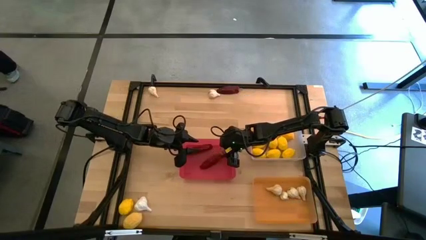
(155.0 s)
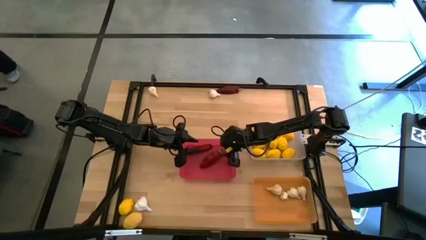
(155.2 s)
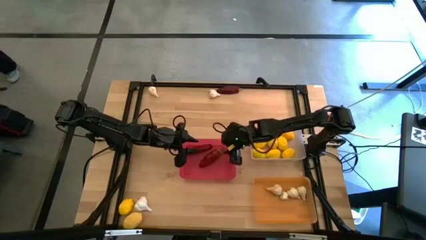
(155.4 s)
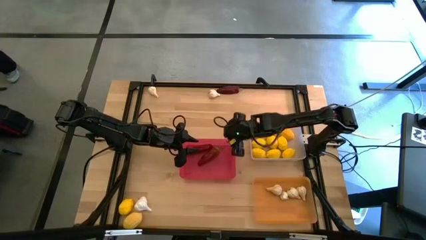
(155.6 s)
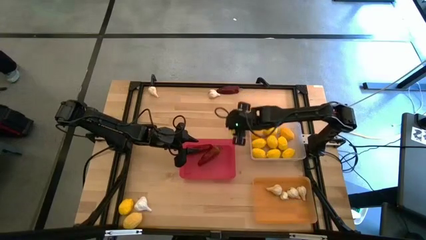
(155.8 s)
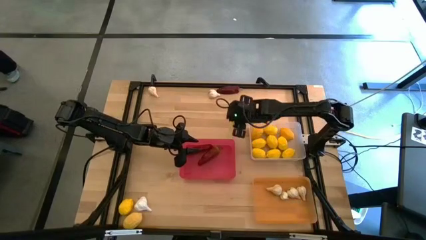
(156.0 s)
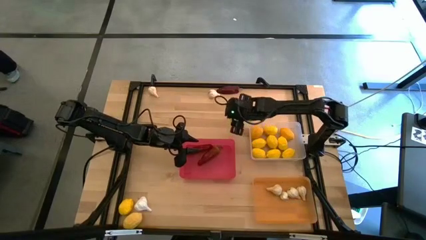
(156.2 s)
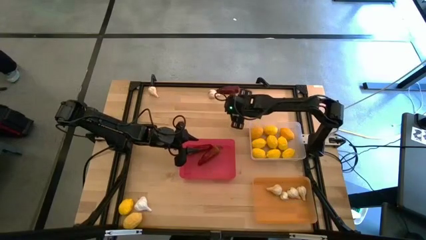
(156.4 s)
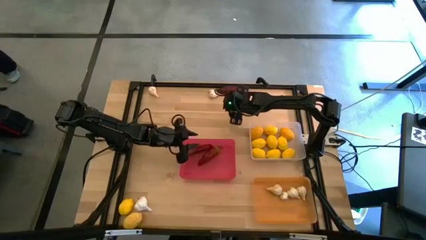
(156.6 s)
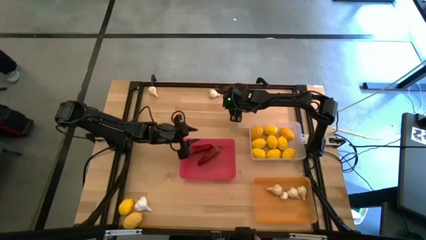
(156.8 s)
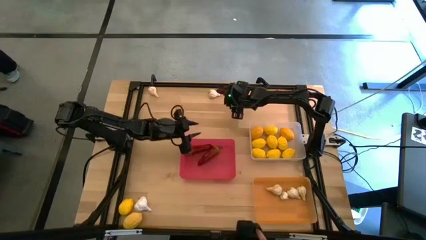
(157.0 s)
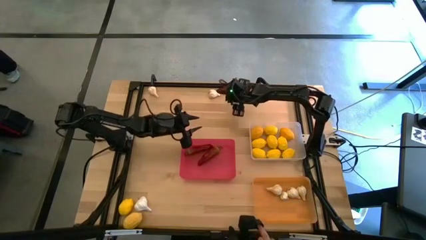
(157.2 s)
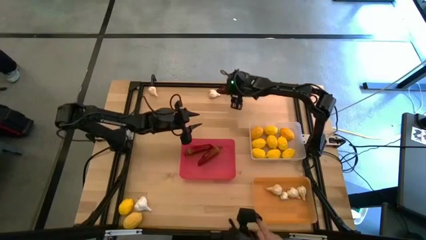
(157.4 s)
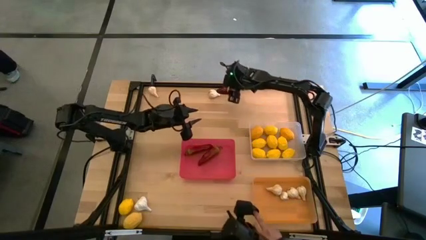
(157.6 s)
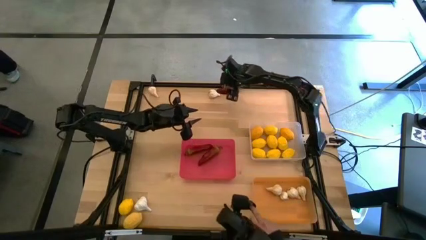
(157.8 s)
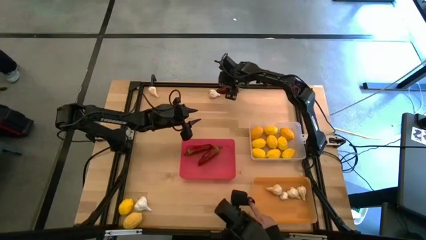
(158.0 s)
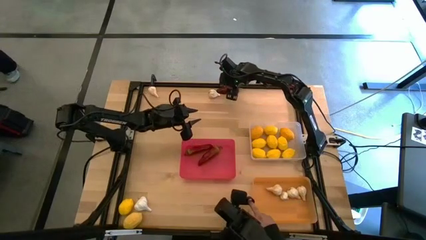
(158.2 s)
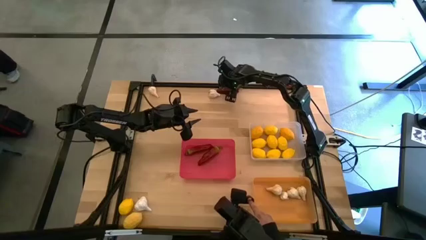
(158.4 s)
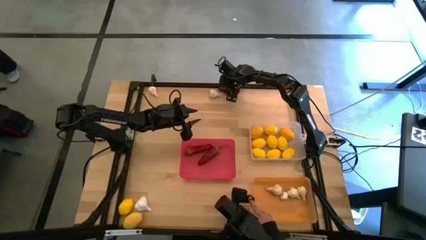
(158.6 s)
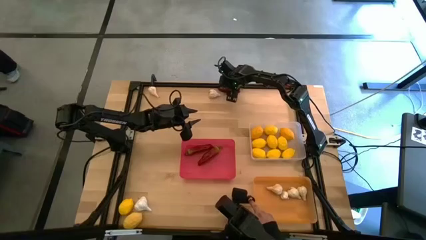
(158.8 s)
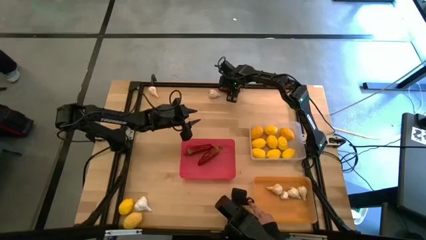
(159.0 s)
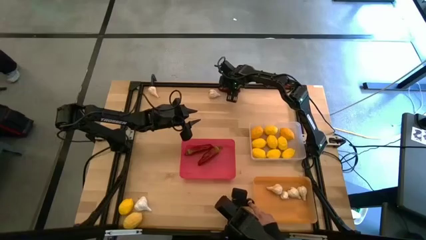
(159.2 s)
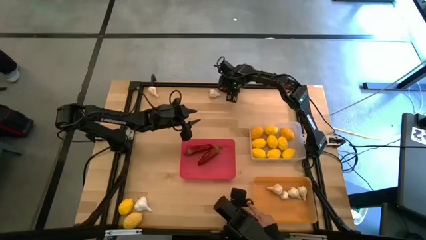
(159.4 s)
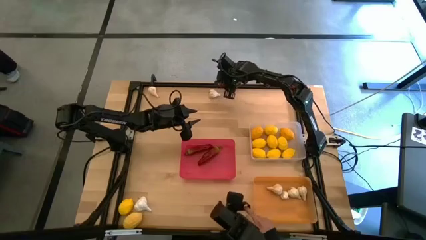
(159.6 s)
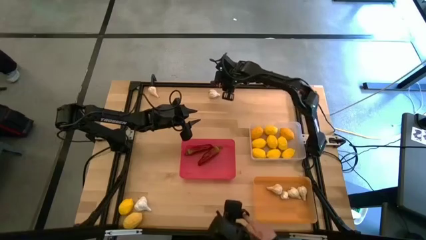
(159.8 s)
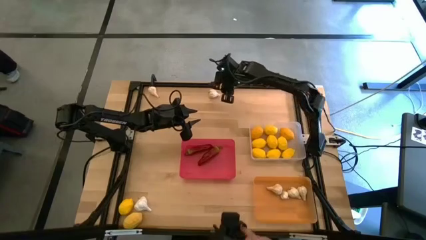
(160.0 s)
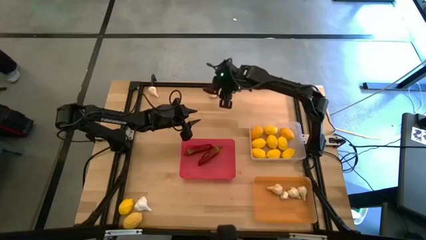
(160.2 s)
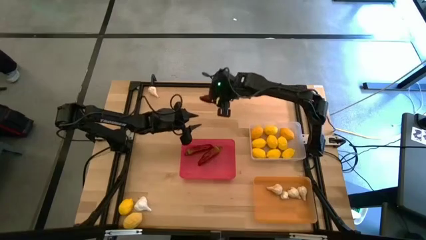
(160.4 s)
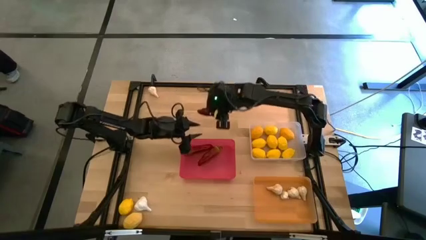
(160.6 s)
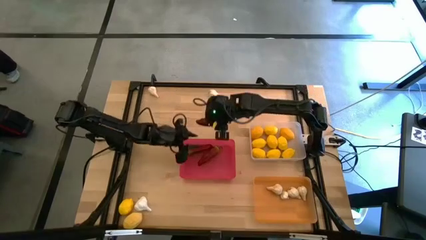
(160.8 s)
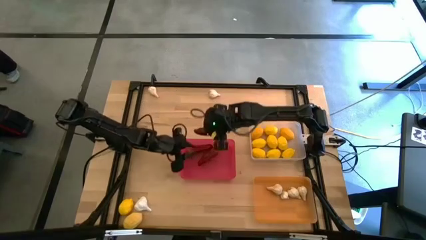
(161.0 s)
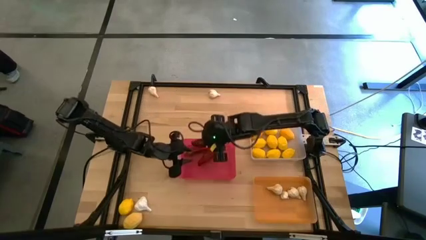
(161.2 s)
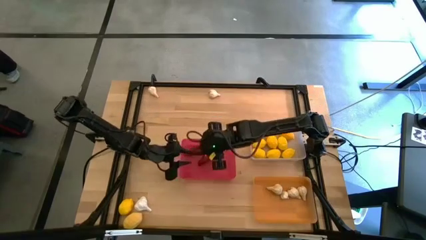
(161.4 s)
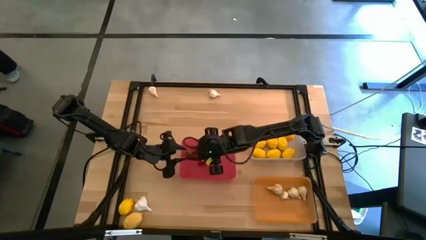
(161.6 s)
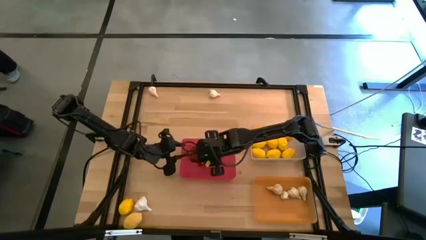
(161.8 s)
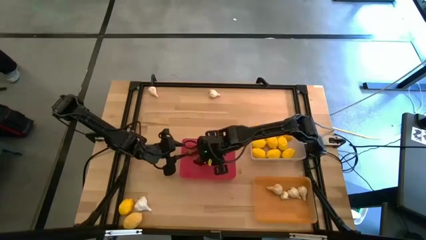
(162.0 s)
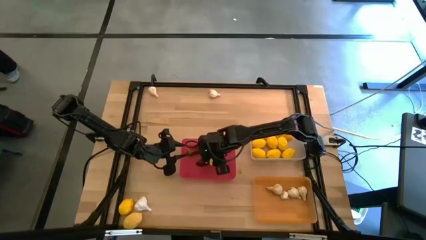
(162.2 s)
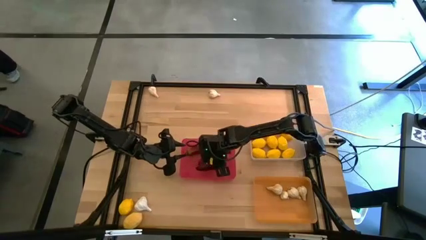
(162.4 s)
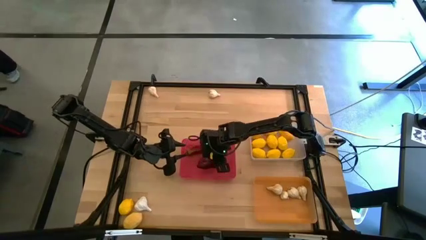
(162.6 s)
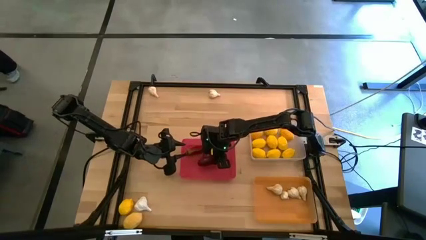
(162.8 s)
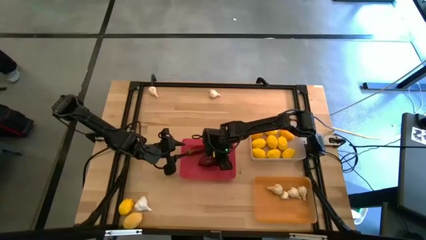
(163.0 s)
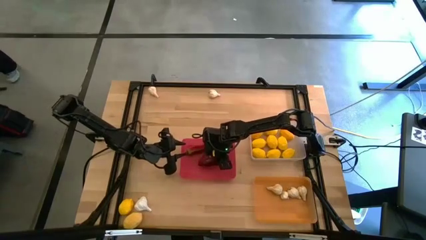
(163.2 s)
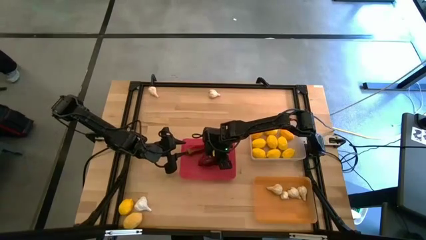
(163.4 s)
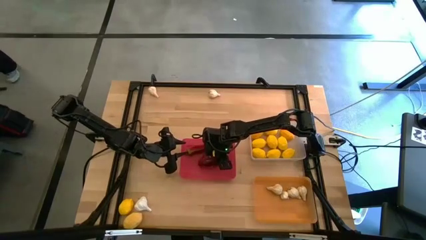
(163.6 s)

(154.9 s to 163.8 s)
Task: Sort produce into baskets
Put the red chili pepper into the red bin

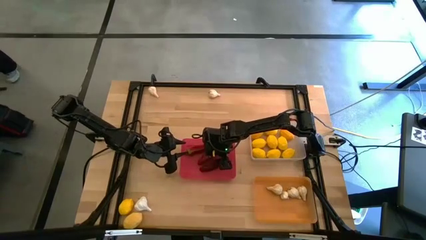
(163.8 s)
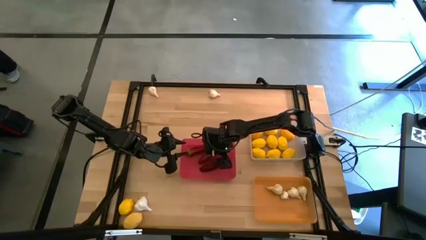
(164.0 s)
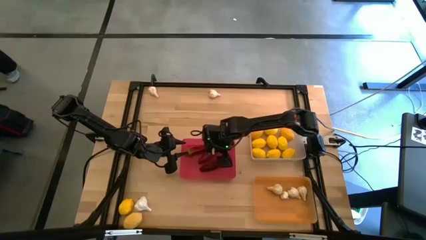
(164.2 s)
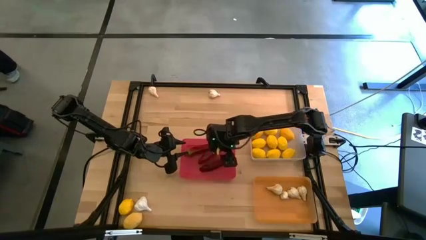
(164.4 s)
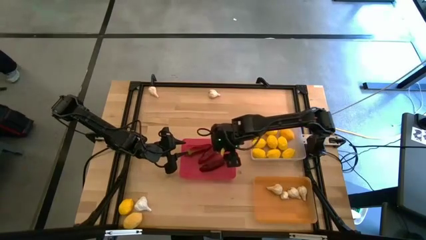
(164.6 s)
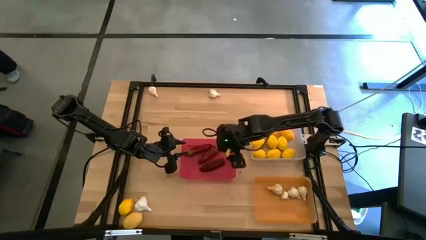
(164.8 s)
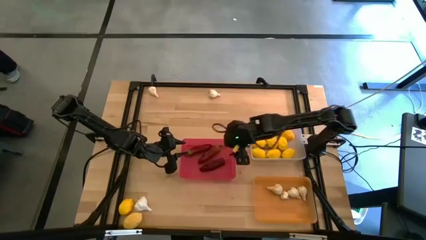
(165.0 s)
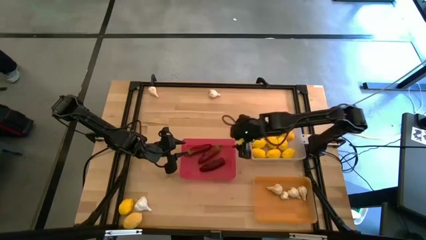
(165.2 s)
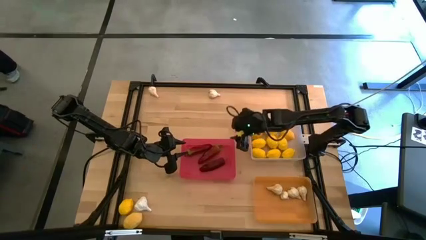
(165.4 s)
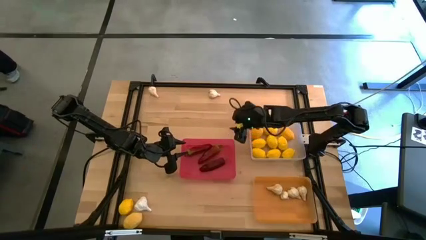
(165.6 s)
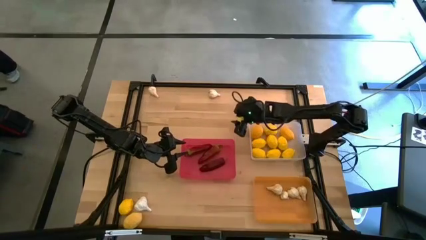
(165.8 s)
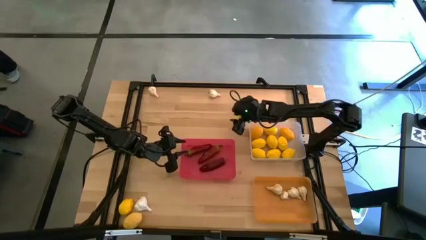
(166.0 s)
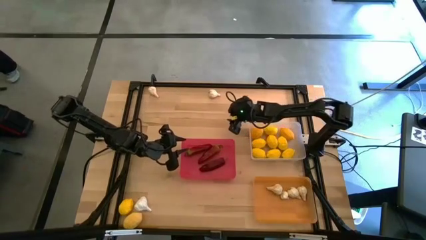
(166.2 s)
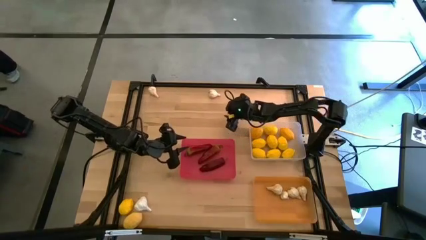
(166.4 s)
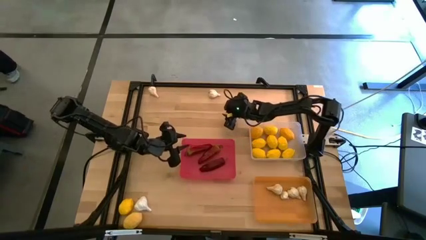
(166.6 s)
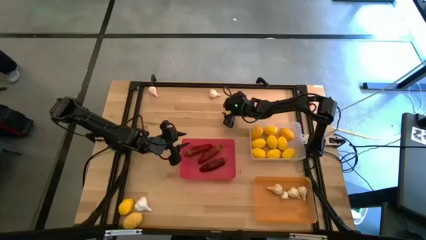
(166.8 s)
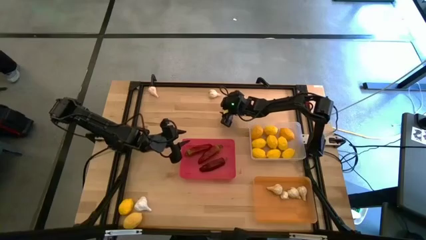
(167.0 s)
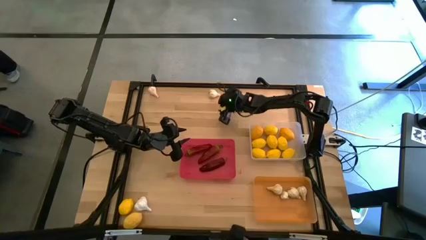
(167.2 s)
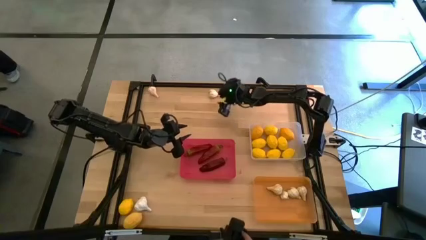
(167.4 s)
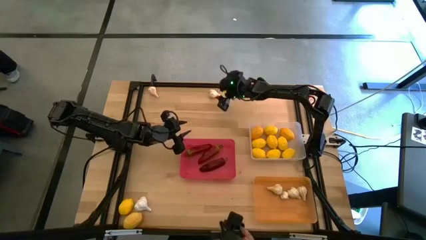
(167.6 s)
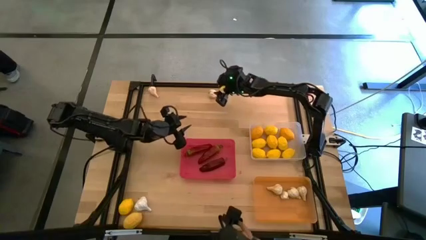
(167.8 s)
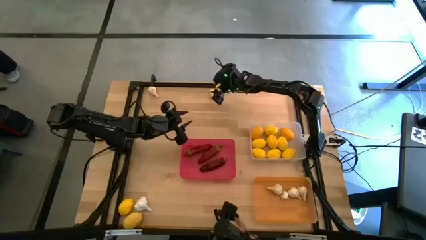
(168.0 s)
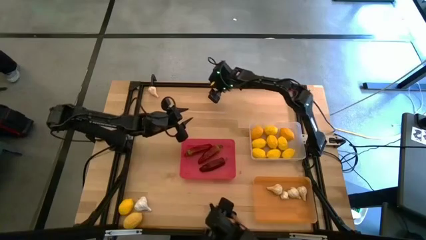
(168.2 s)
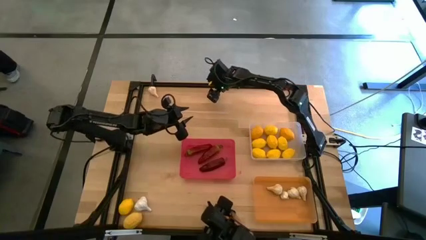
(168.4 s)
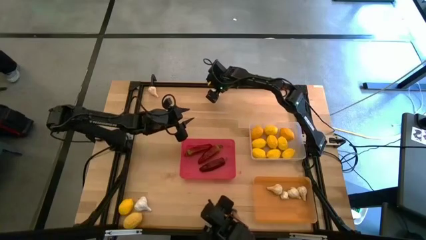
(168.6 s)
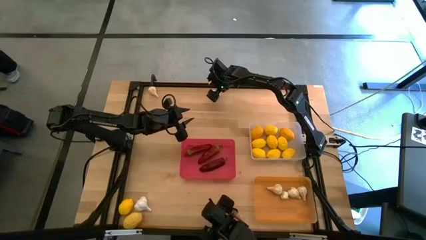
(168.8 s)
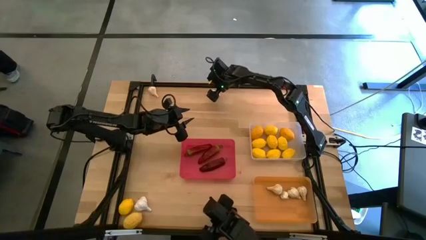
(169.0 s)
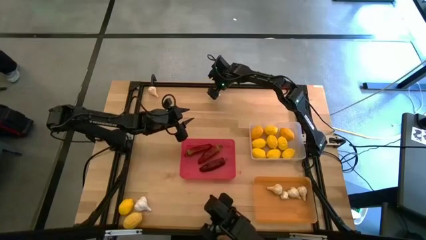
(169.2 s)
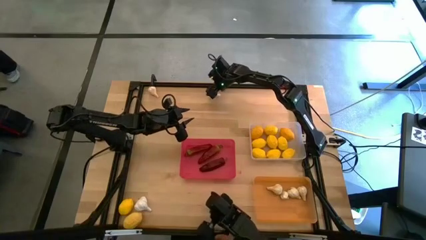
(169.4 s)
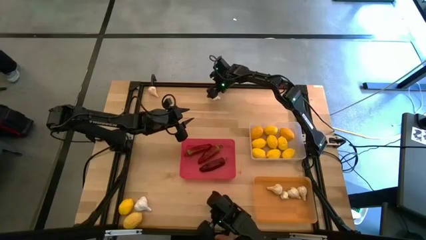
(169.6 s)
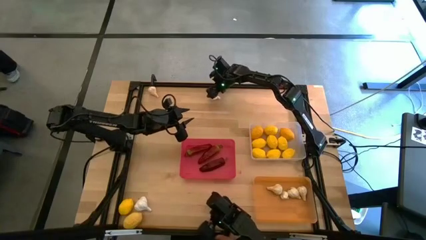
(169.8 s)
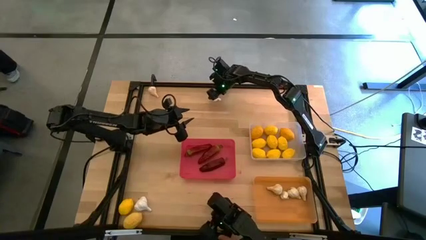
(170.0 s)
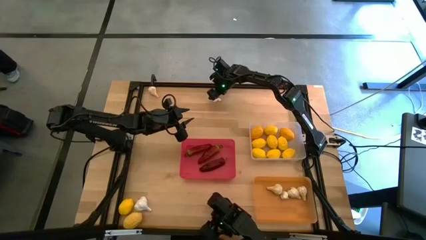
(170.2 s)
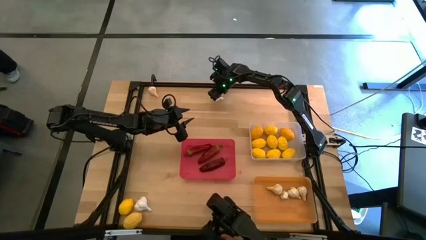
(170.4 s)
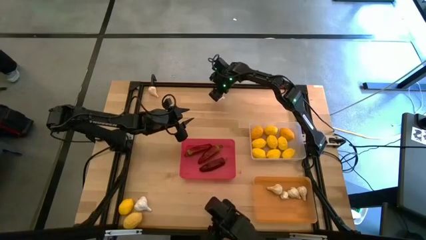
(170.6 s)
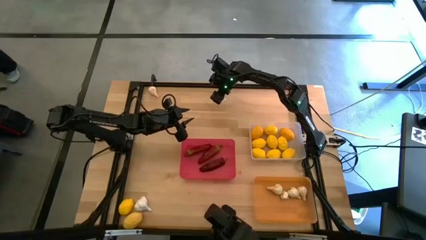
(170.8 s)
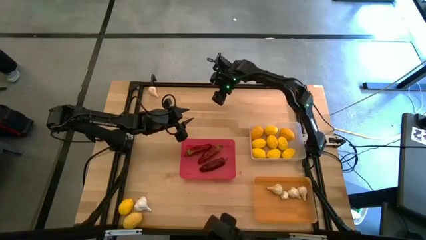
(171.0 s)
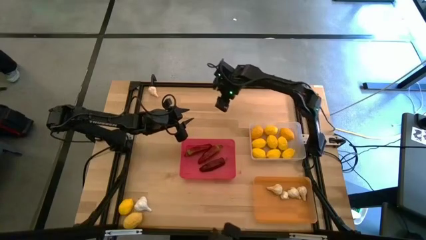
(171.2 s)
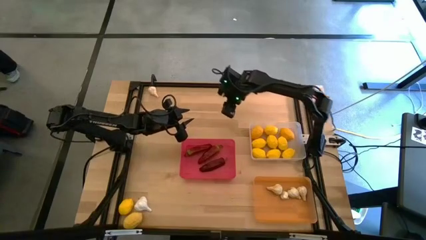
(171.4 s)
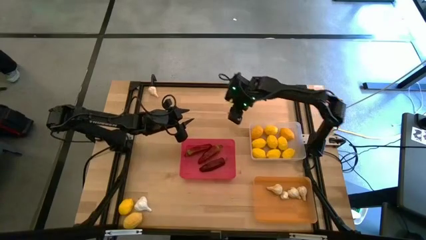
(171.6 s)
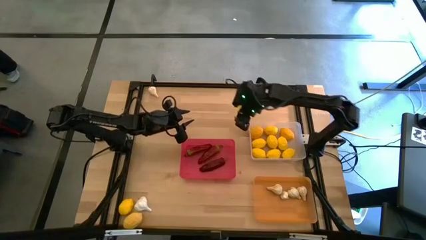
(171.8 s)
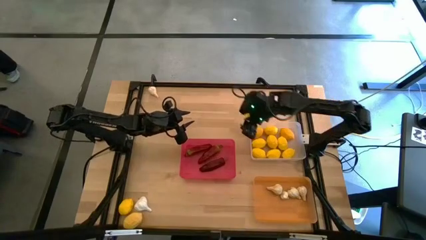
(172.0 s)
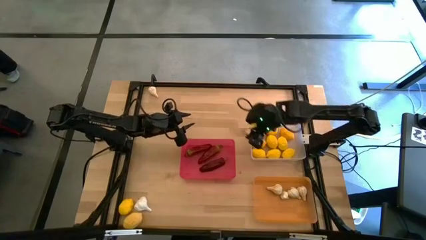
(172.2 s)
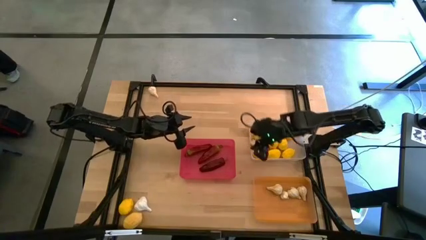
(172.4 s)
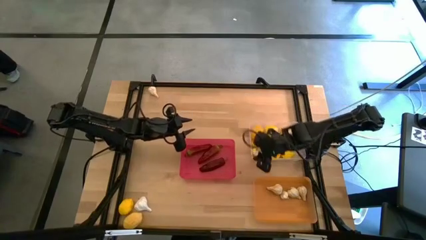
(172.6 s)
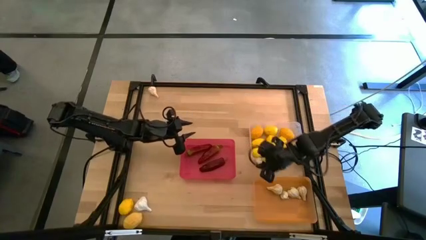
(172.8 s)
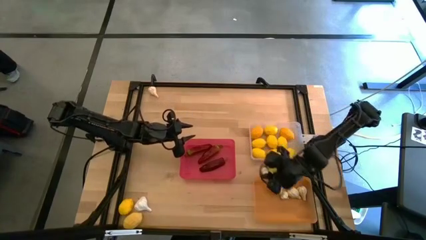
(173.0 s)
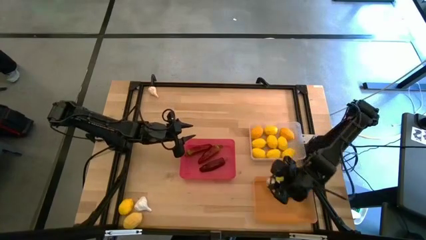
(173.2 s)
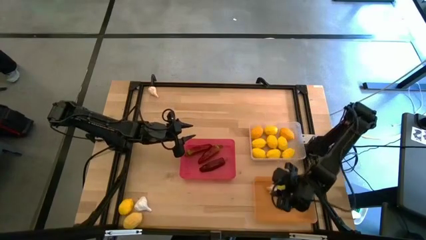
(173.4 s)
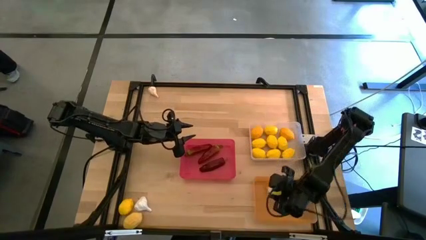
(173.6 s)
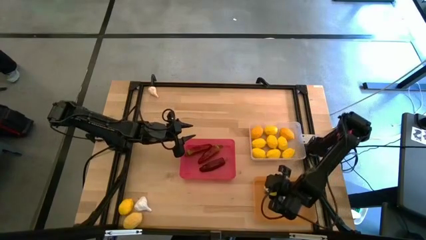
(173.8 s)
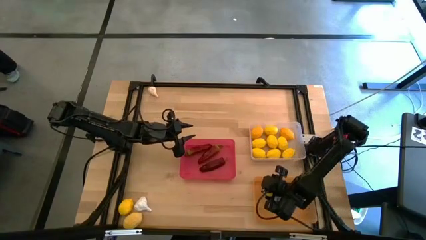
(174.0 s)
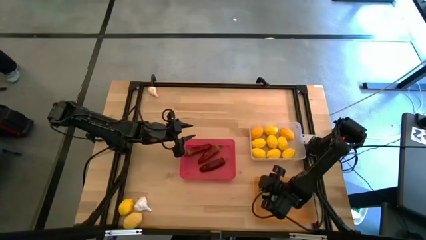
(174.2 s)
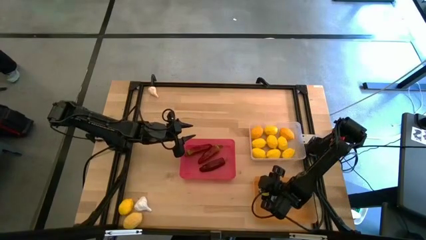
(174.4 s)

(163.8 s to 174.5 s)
Put the white garlic into the orange bin
